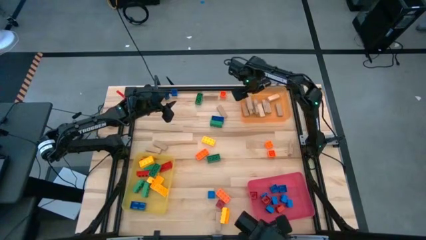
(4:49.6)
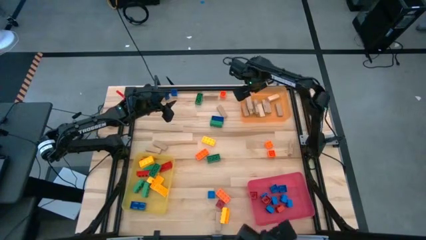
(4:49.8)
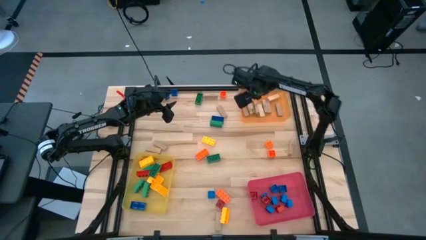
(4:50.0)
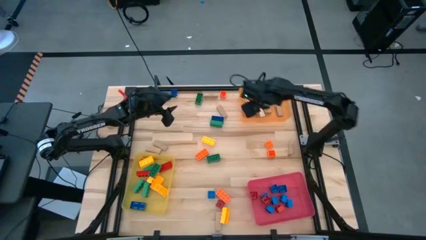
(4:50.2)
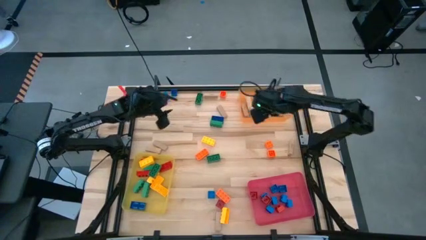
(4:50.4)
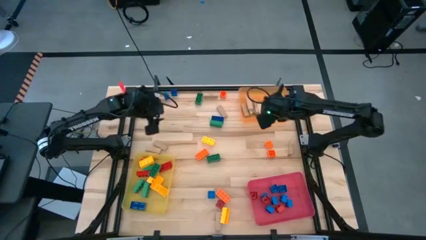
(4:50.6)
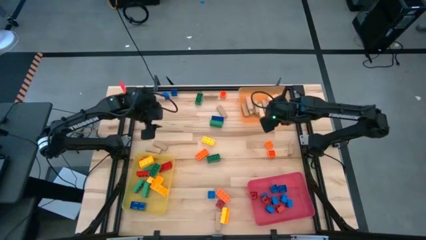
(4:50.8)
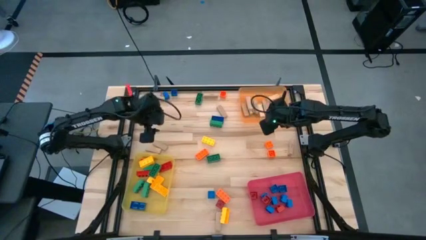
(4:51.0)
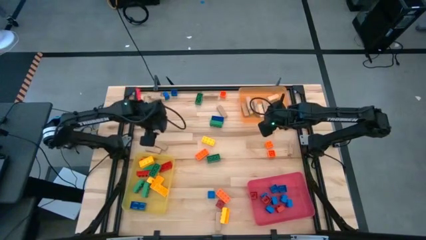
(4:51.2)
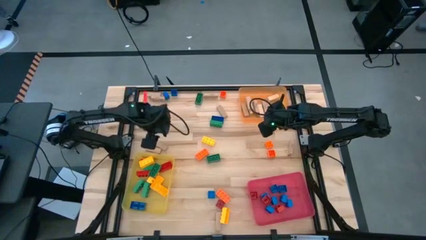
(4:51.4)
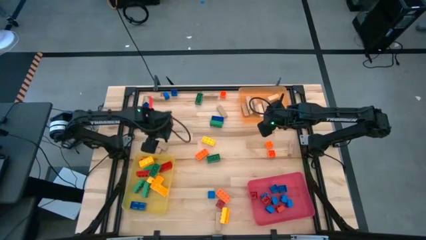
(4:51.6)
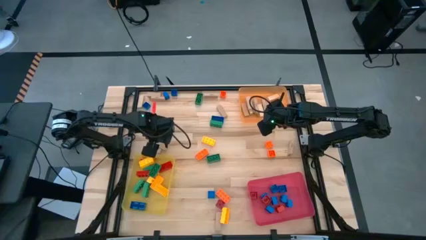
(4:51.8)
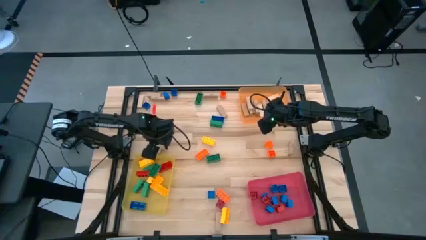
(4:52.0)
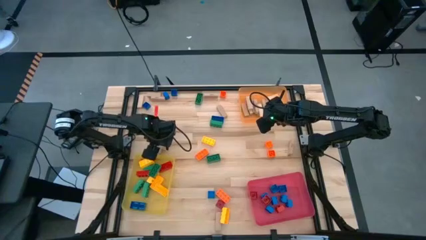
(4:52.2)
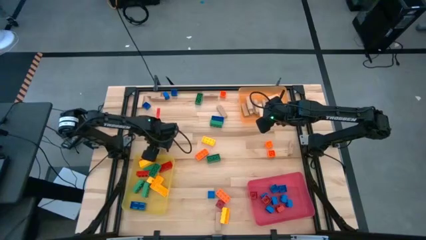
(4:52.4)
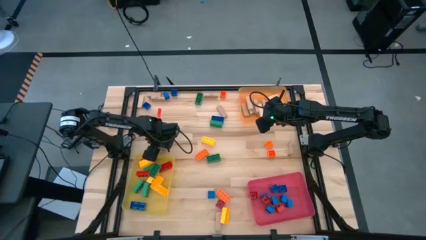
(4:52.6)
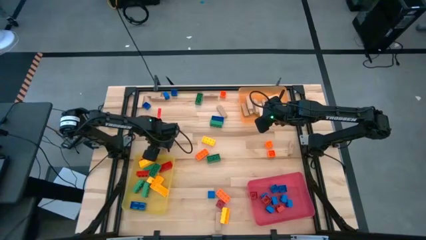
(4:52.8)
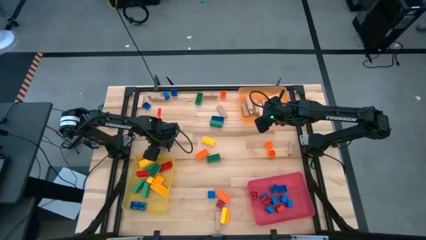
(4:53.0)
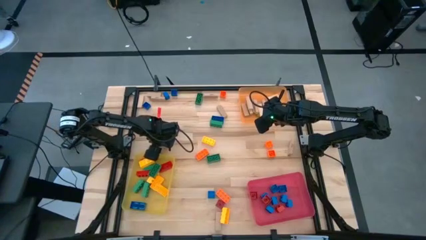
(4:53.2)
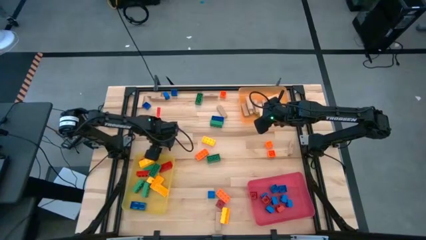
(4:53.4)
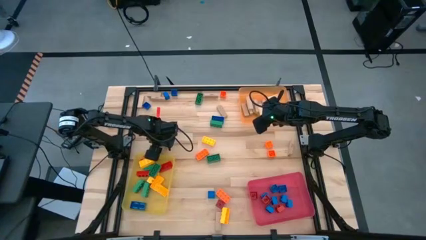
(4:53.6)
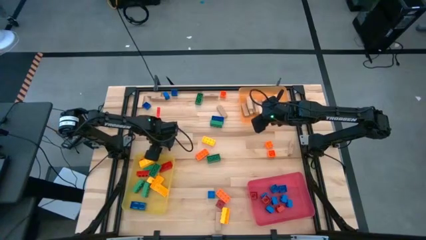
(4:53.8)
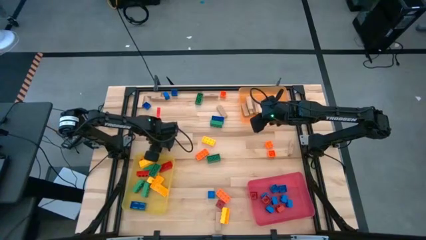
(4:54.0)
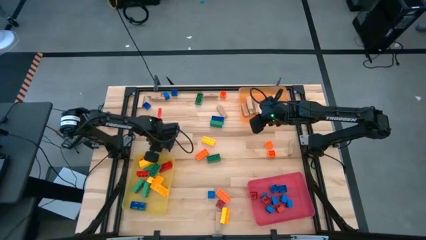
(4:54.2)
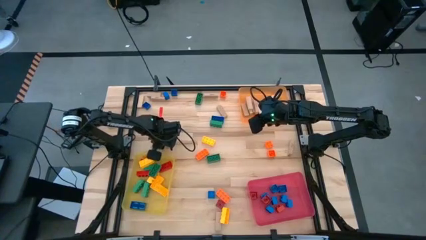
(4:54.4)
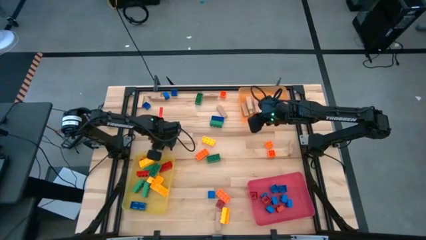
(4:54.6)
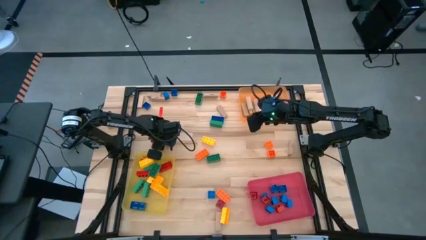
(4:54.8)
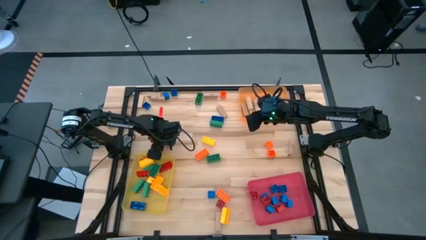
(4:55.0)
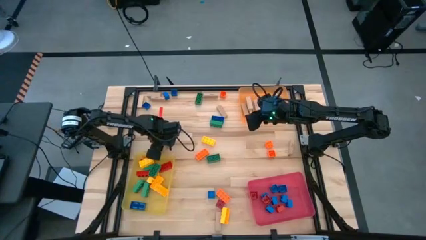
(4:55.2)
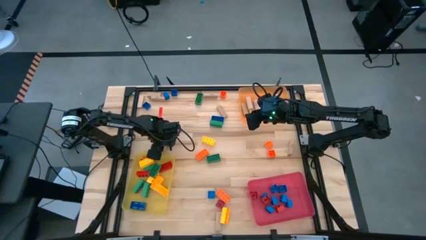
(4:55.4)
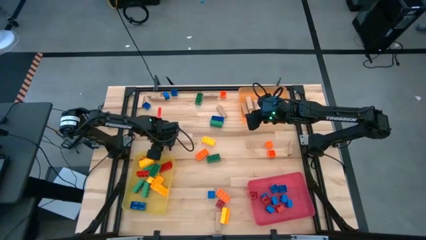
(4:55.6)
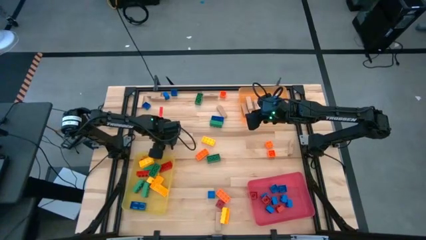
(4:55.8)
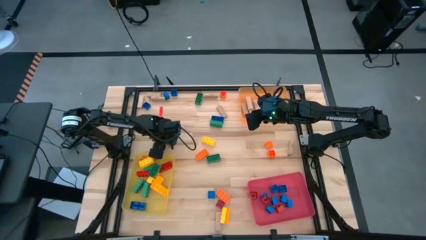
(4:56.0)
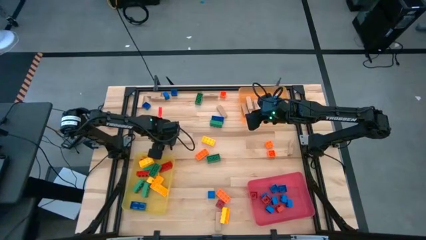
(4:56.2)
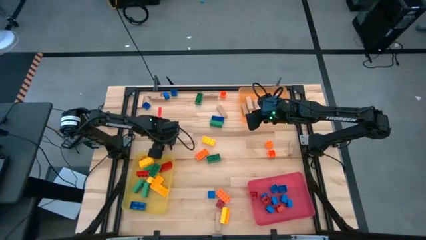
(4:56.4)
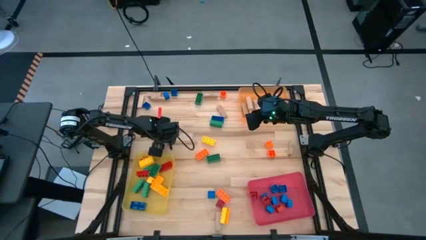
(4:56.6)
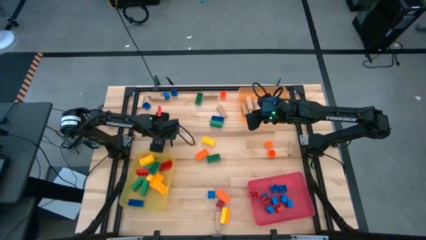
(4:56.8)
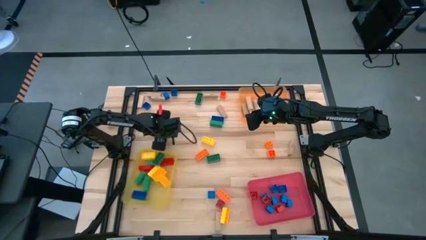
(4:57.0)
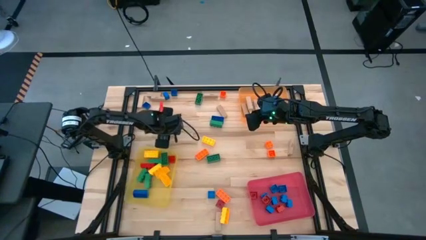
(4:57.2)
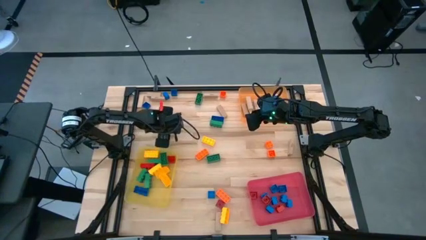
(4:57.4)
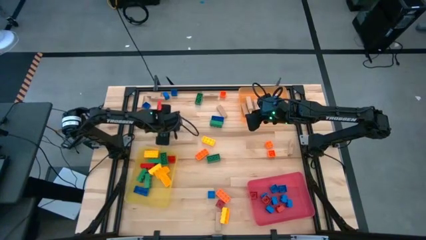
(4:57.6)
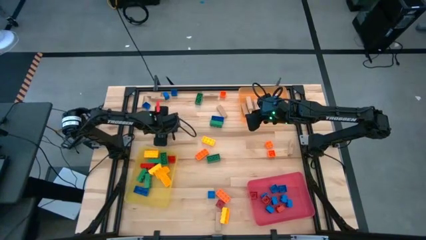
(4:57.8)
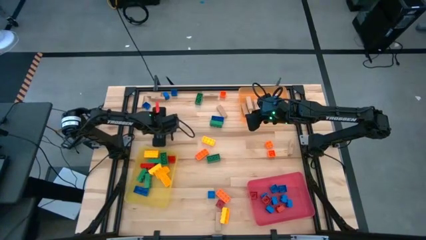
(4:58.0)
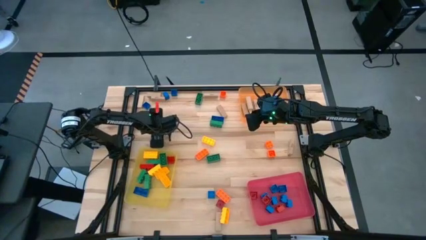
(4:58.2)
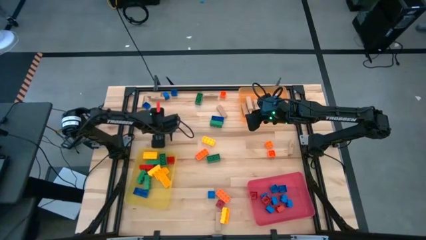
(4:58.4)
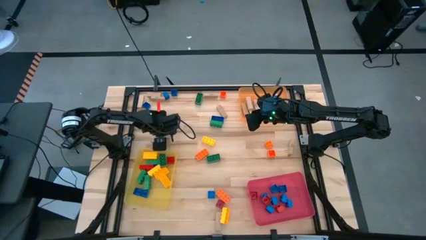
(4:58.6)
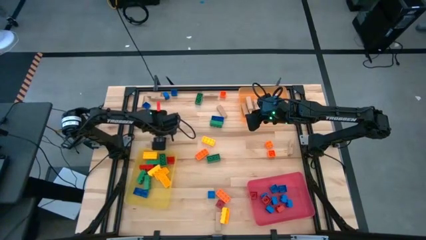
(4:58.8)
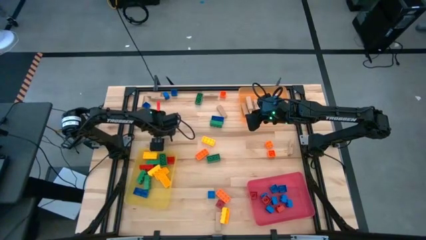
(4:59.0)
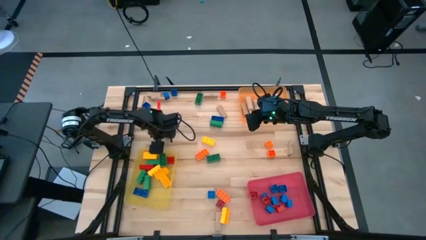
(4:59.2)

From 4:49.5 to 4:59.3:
Task: Sort blocks by size
Put the brown block into the orange bin

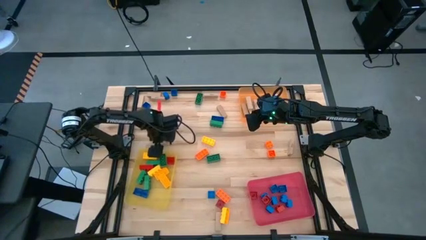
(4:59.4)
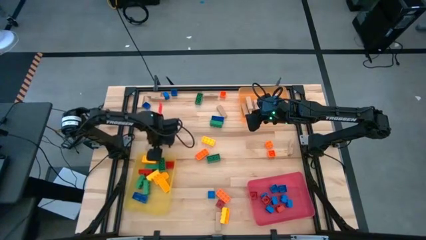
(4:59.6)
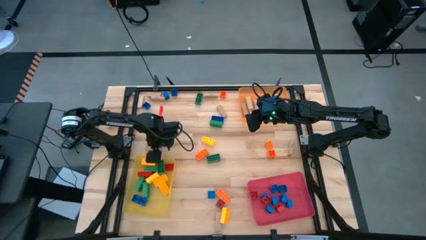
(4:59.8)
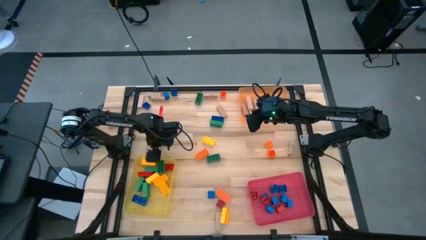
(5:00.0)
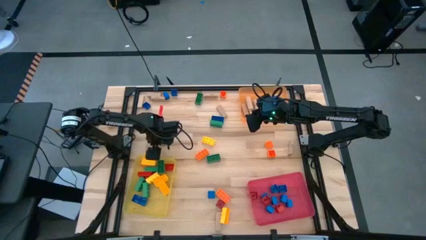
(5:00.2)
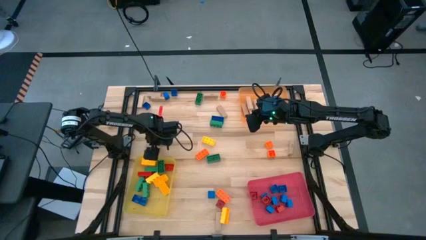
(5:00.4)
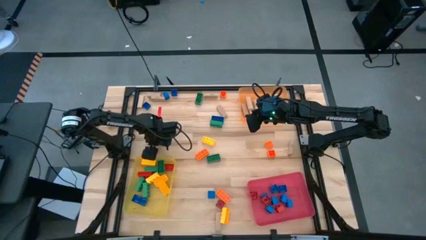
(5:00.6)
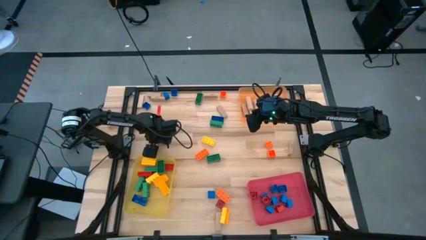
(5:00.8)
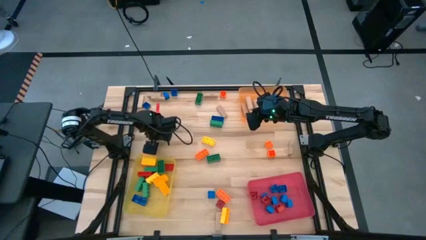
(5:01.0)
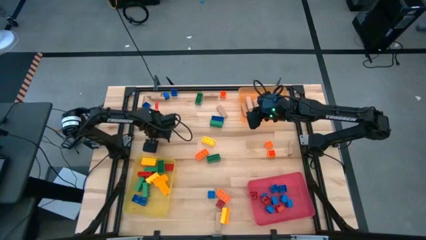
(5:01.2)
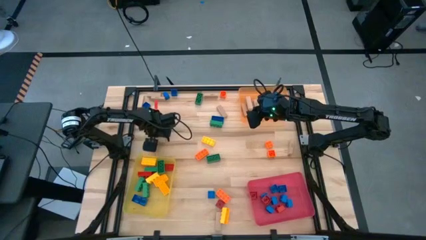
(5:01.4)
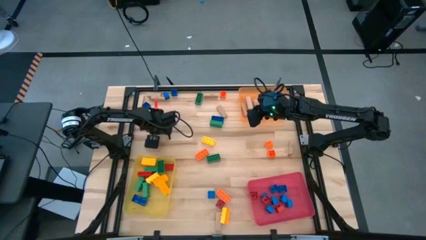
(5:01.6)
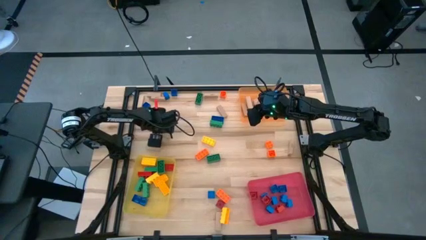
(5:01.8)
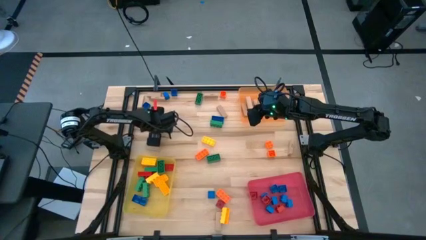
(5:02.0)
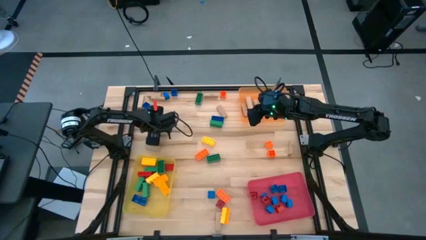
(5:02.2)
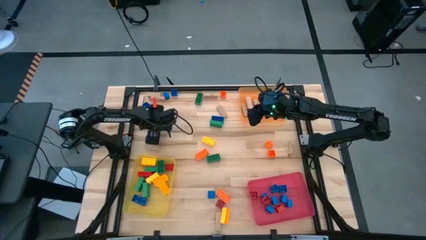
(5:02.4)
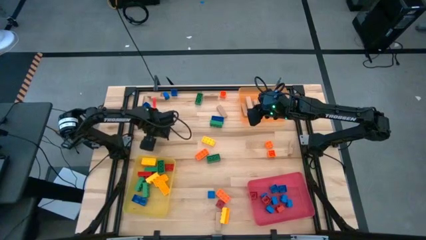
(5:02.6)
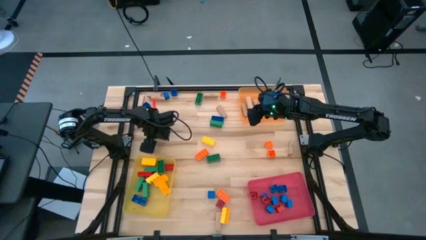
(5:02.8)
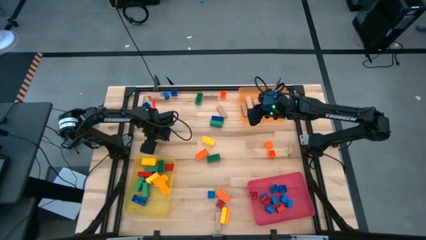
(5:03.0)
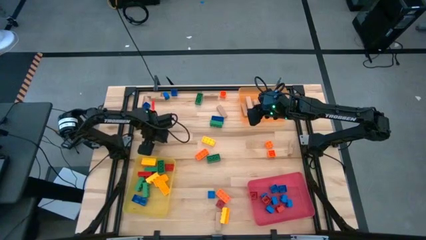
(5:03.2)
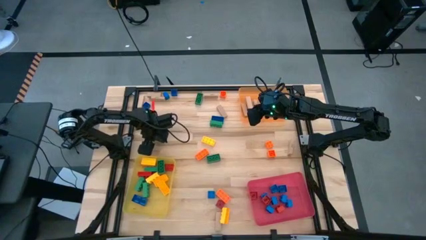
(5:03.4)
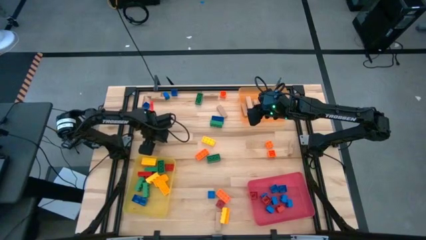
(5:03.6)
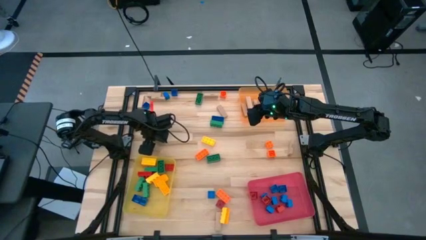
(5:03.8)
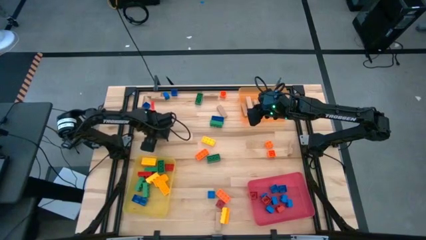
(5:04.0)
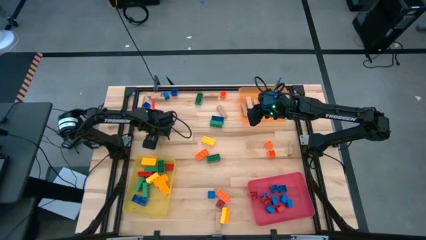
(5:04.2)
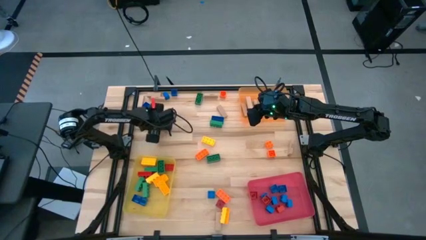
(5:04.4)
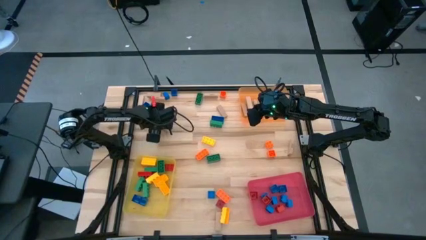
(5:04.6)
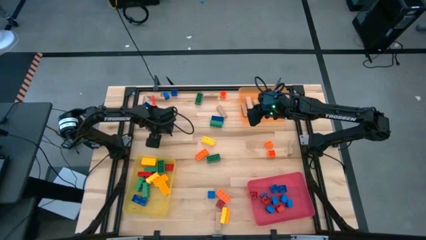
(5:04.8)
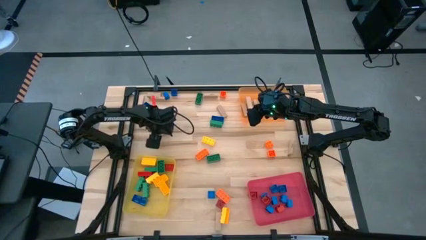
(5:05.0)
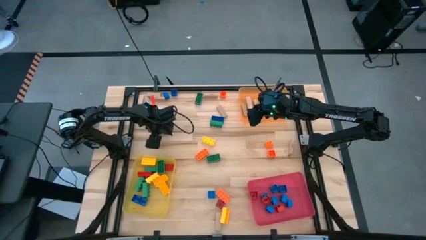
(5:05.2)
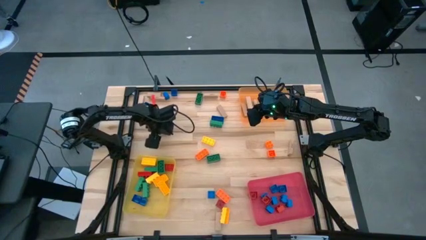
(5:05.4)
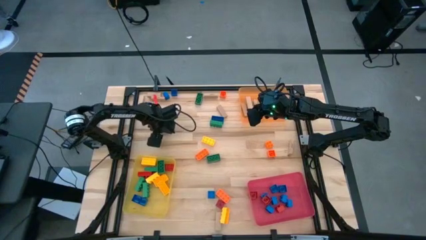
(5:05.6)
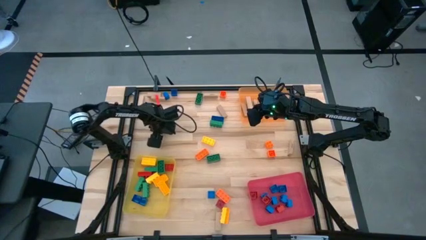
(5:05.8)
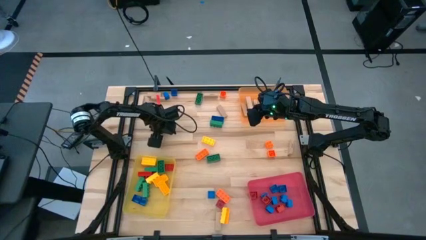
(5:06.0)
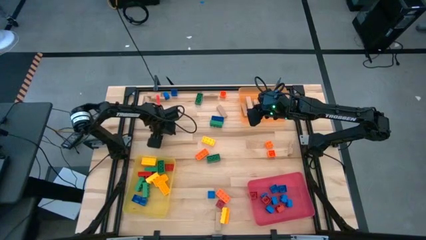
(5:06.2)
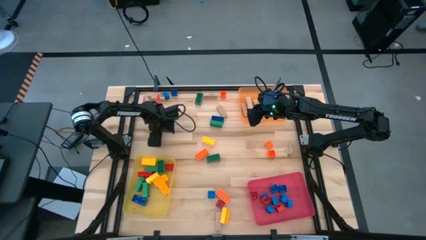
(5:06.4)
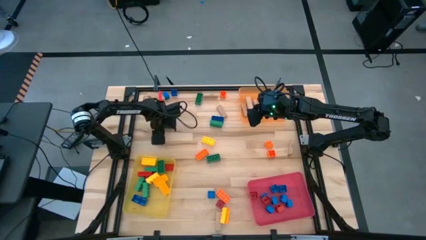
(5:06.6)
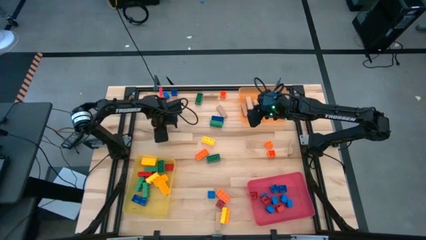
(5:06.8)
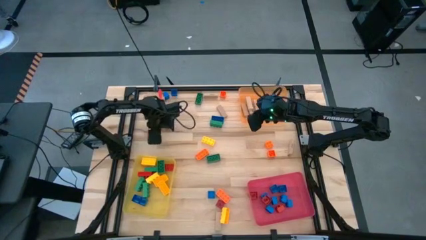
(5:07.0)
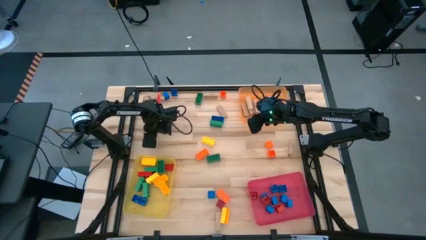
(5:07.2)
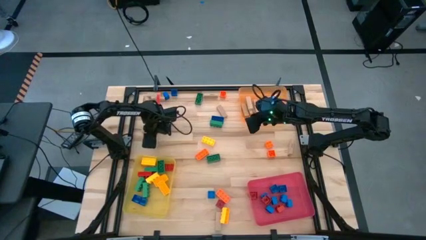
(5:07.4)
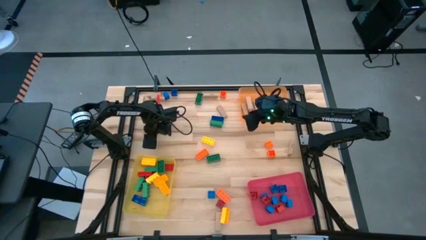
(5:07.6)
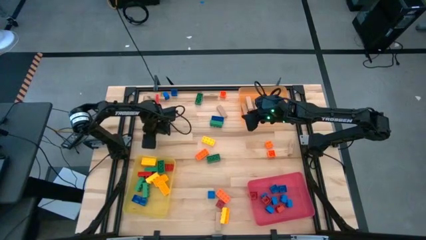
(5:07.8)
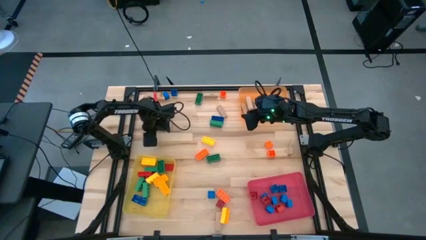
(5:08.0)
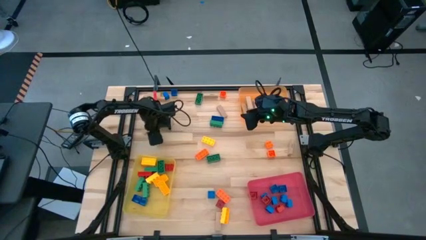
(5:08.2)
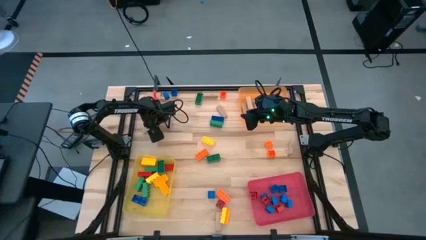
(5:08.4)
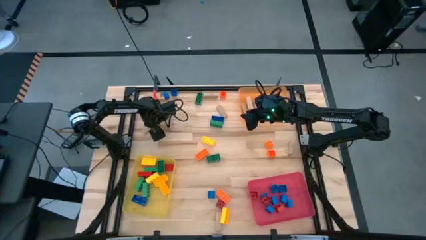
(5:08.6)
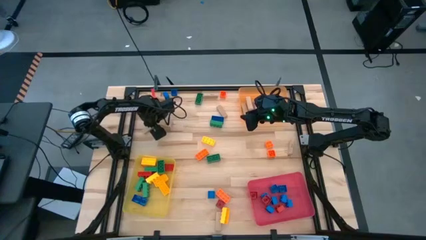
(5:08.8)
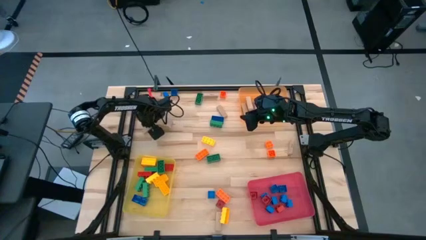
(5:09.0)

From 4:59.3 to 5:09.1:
Put the brown block into the orange bin
